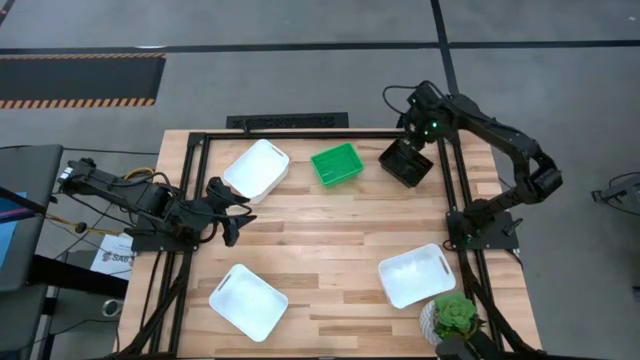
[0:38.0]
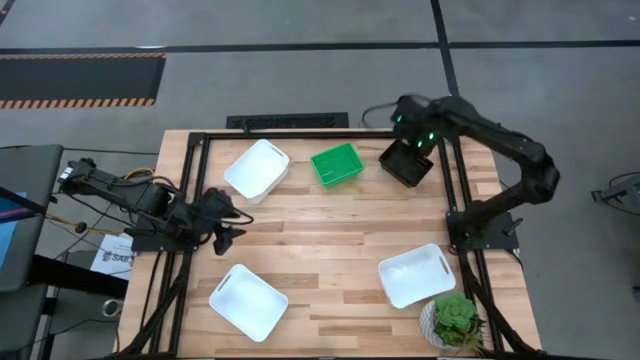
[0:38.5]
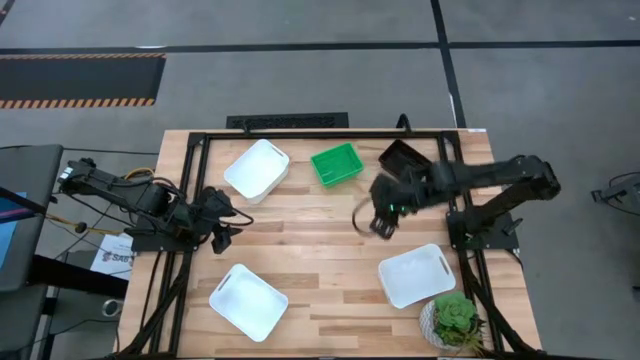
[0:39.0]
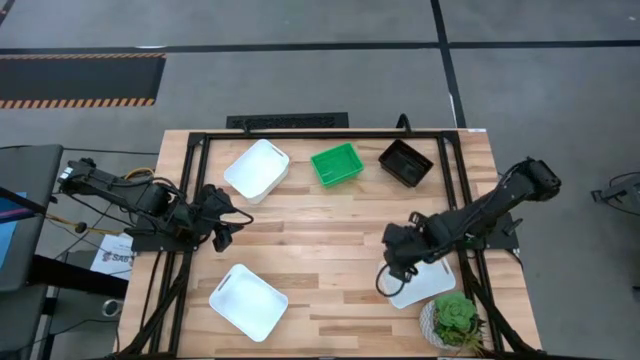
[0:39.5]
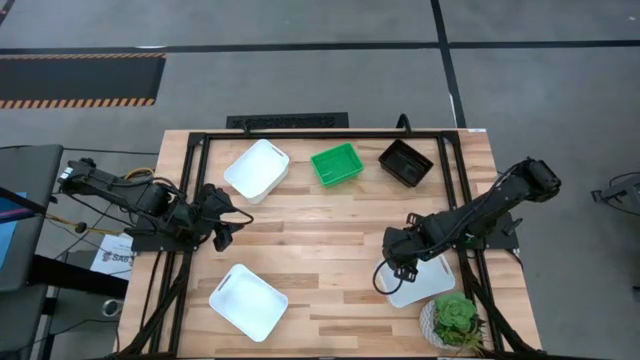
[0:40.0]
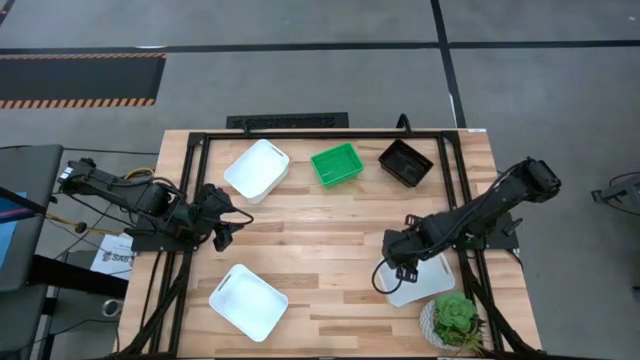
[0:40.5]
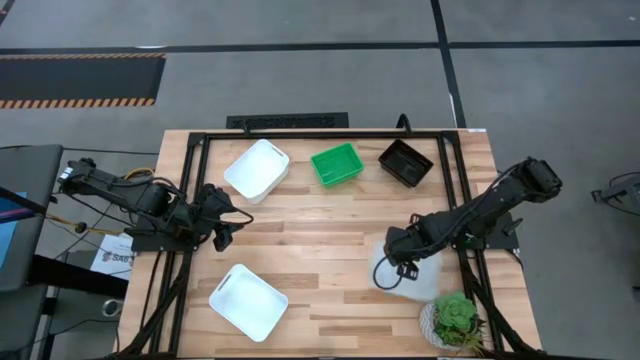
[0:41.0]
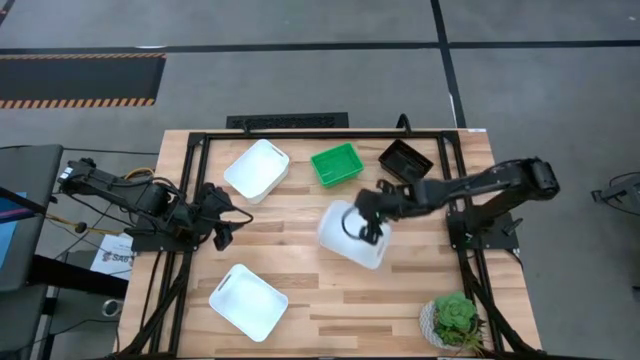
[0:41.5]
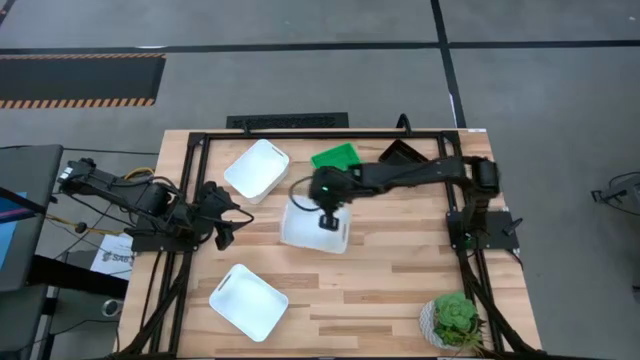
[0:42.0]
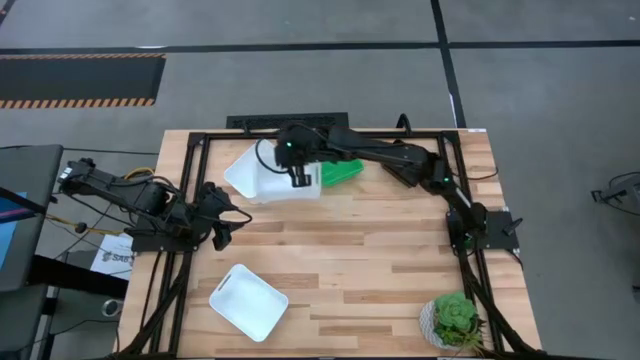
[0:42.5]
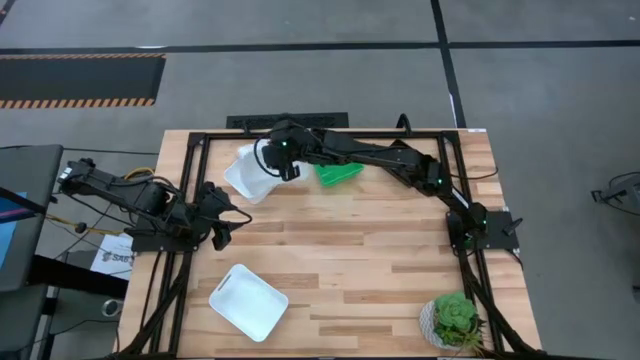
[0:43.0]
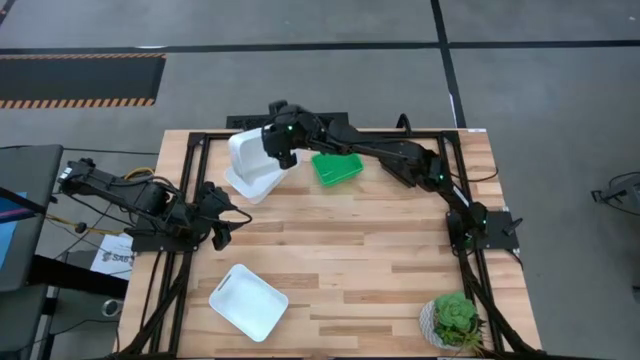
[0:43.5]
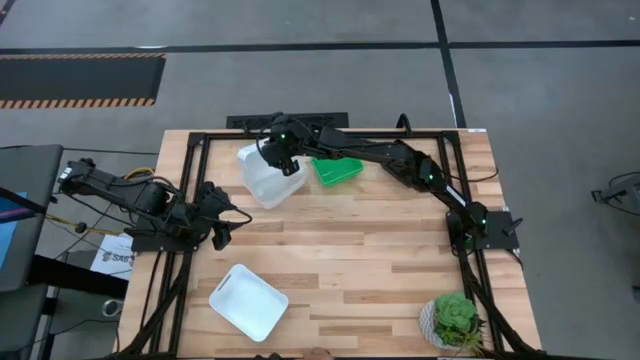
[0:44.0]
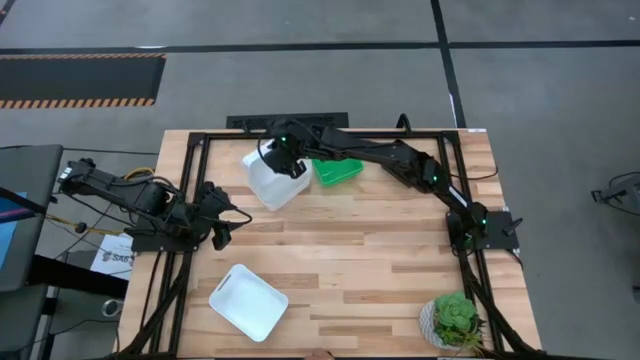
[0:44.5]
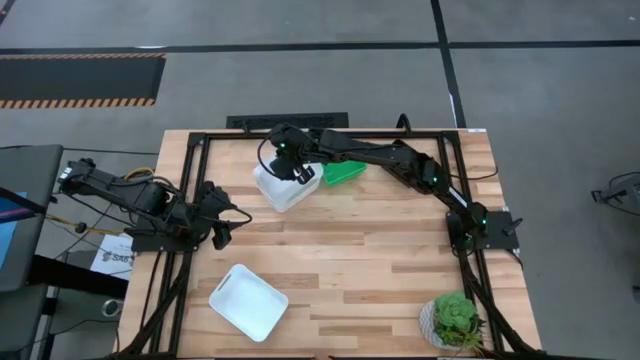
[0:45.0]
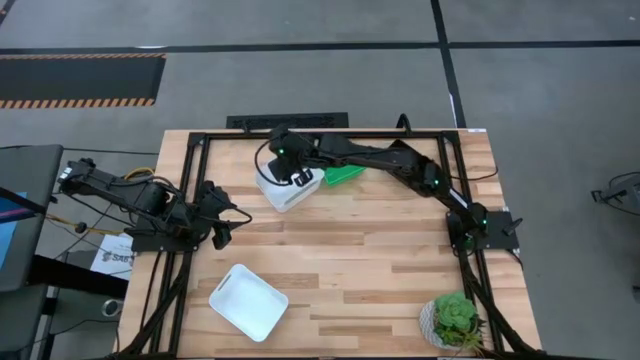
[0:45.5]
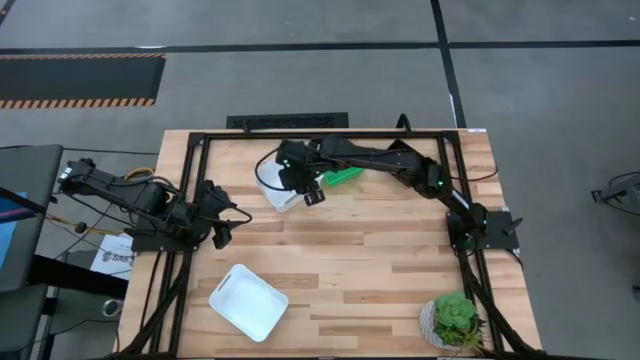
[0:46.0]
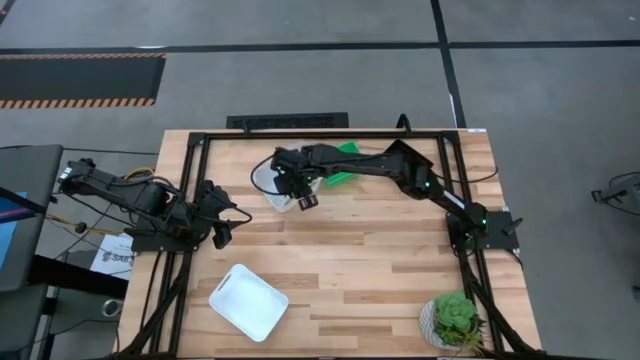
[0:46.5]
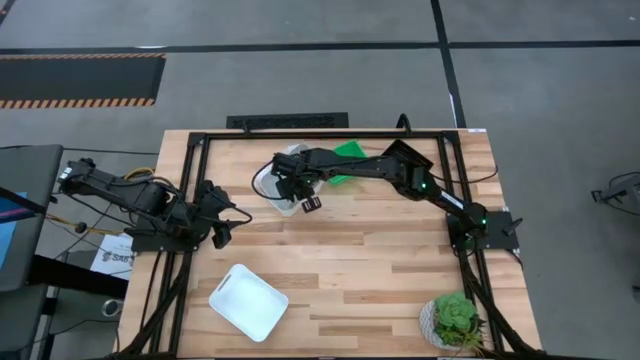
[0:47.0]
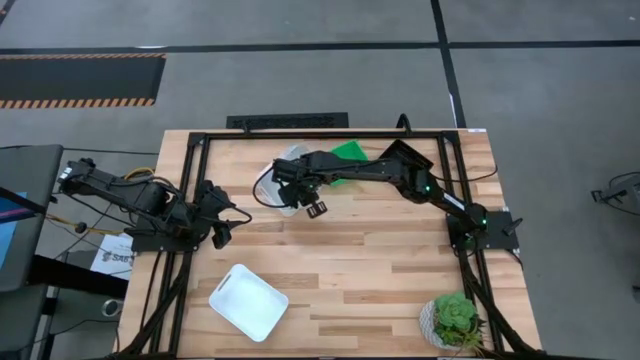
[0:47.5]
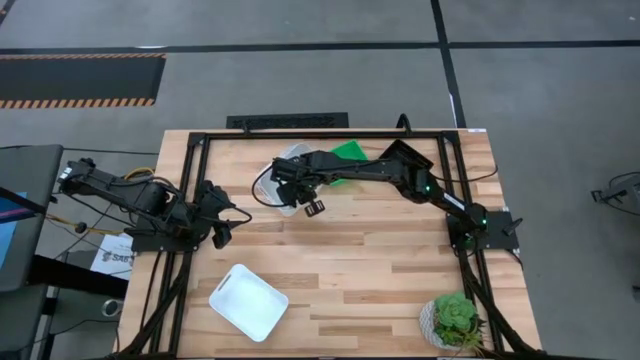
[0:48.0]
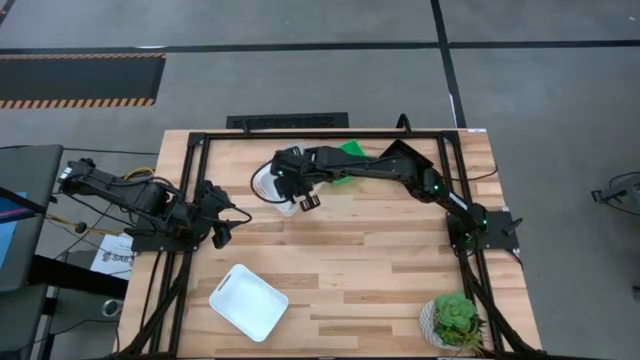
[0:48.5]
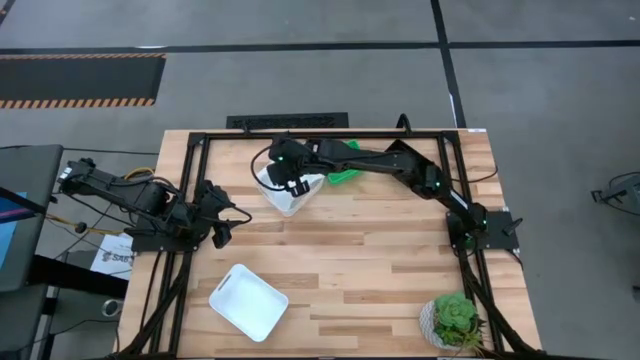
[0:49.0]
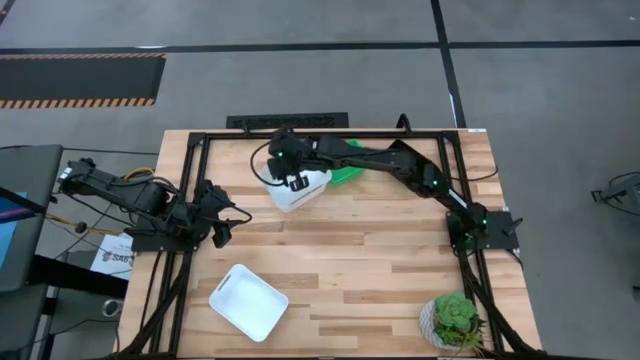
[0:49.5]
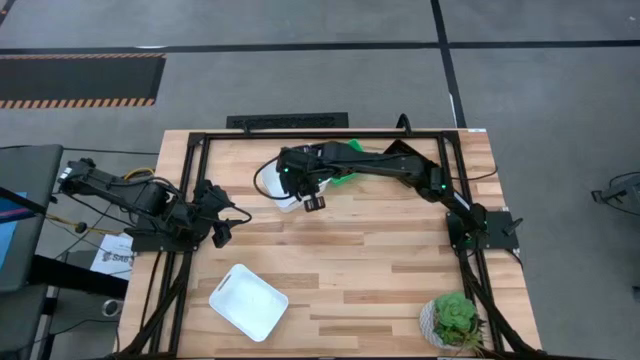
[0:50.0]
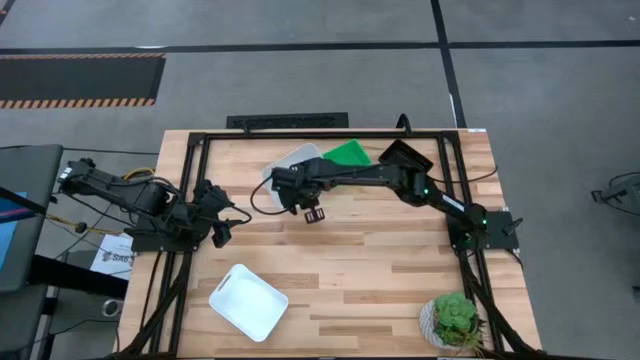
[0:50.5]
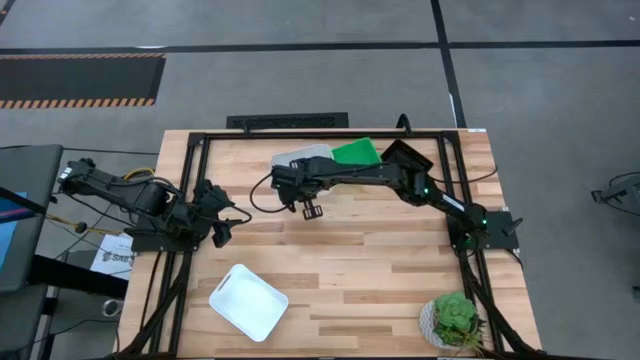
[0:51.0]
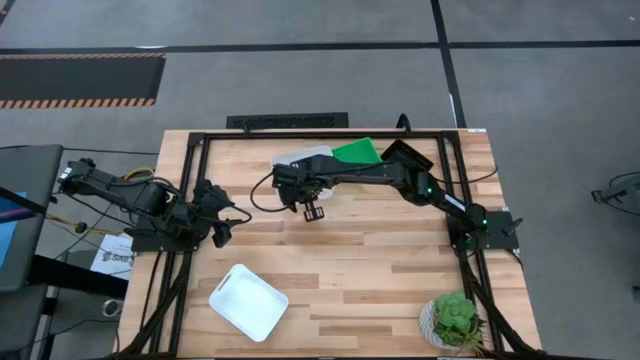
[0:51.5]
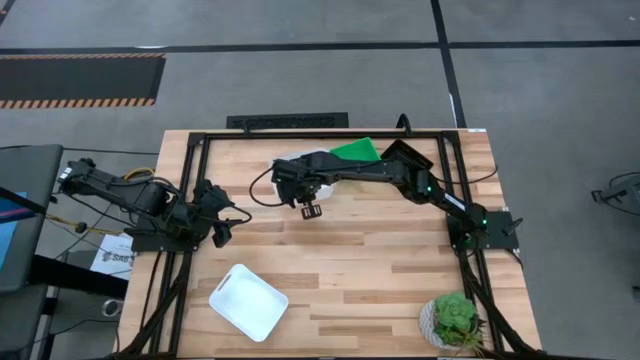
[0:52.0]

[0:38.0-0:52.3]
Stack the bottom right white bin on top of the top white bin
